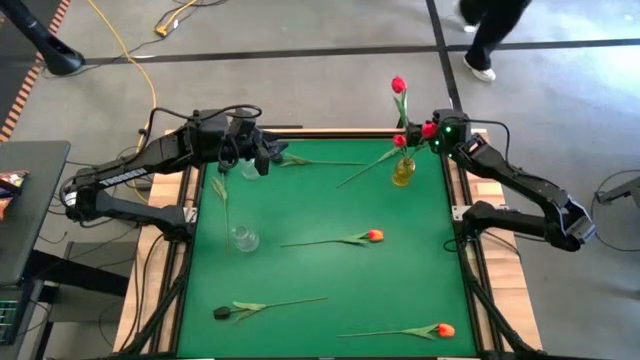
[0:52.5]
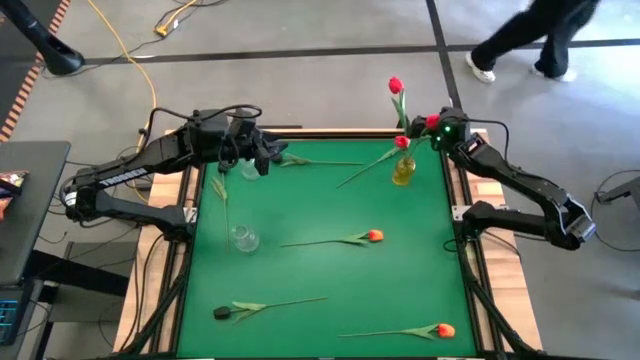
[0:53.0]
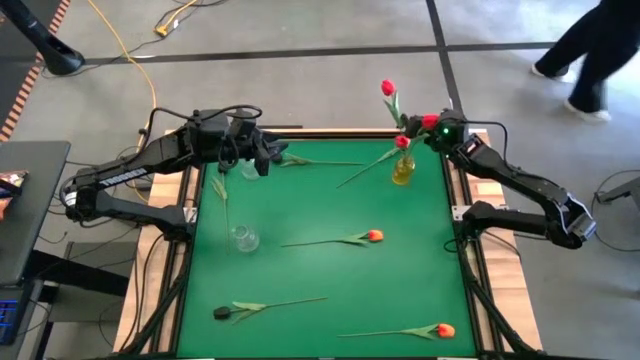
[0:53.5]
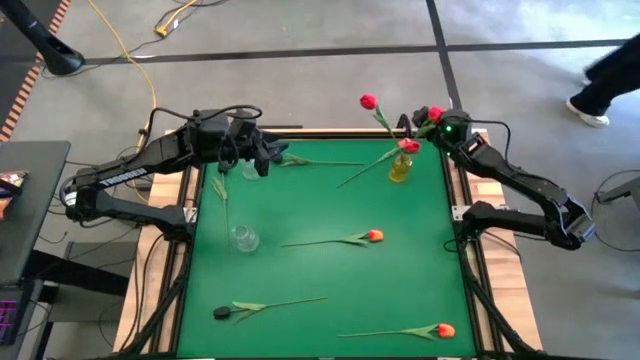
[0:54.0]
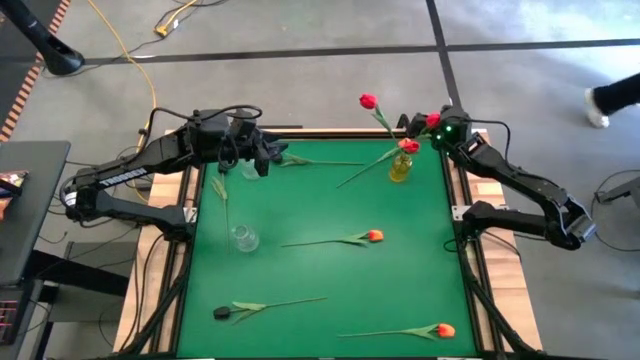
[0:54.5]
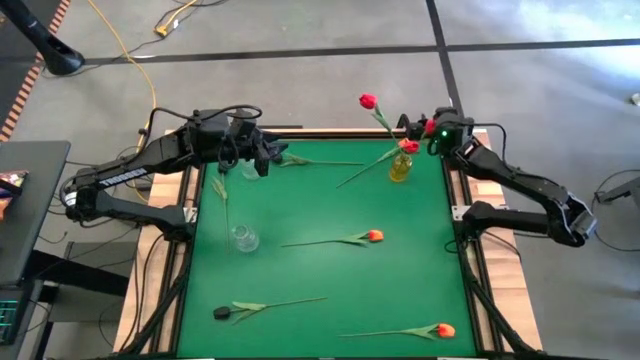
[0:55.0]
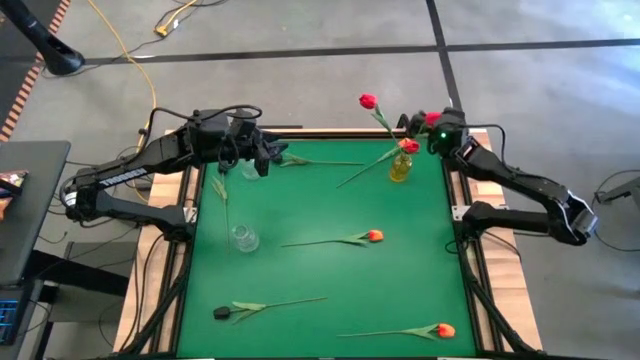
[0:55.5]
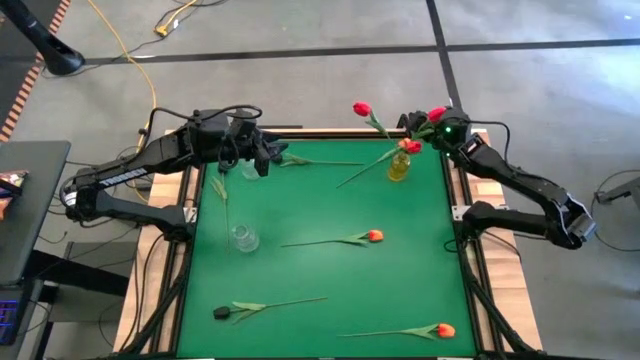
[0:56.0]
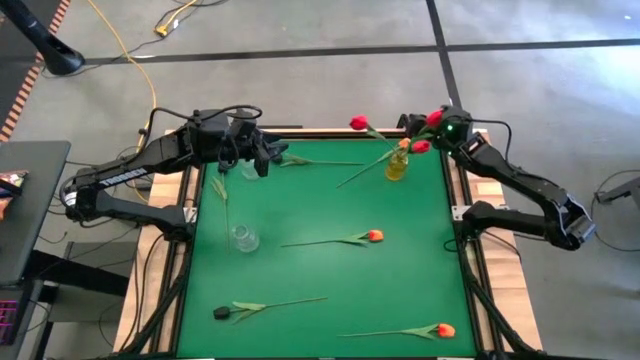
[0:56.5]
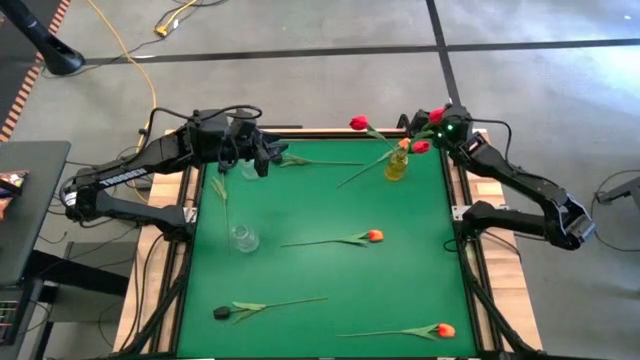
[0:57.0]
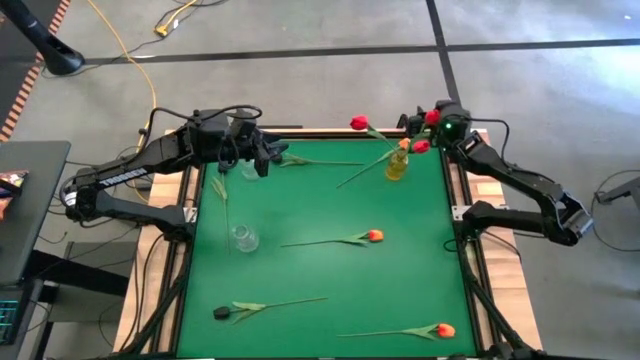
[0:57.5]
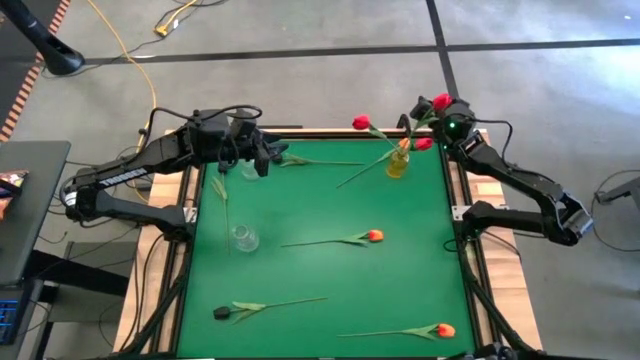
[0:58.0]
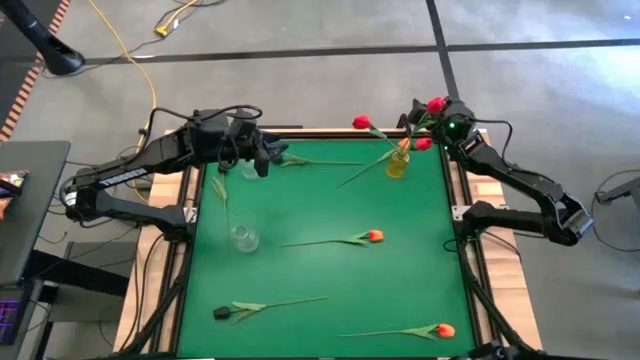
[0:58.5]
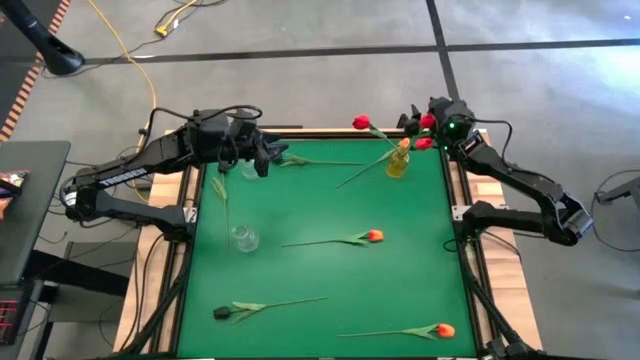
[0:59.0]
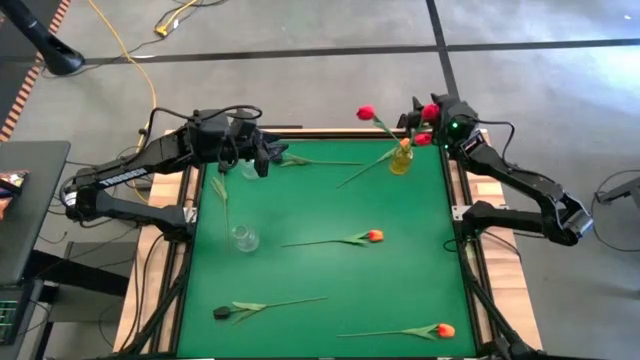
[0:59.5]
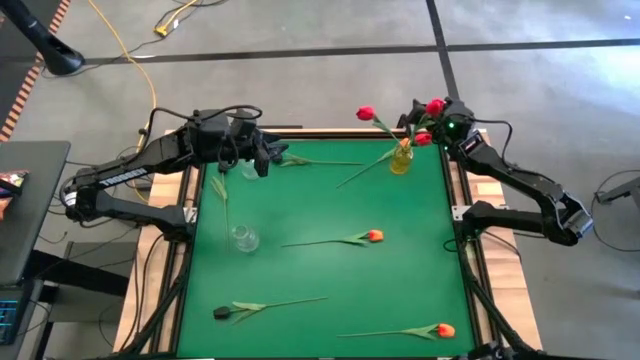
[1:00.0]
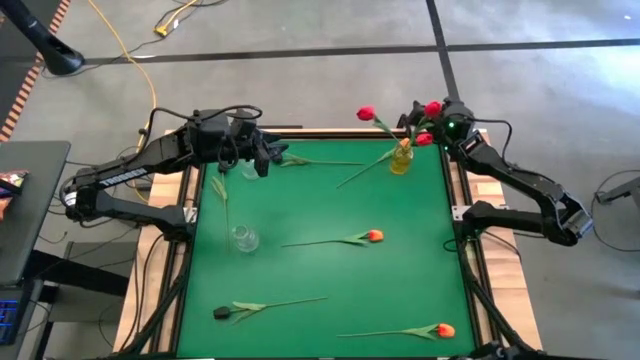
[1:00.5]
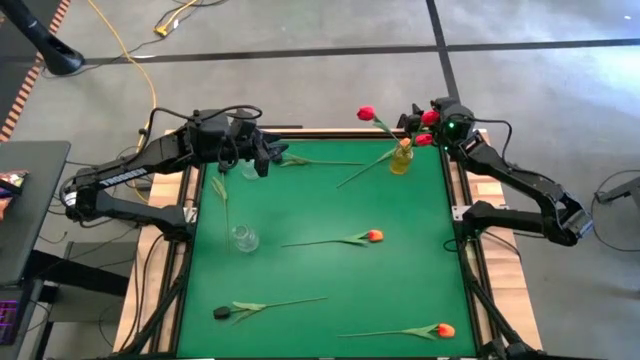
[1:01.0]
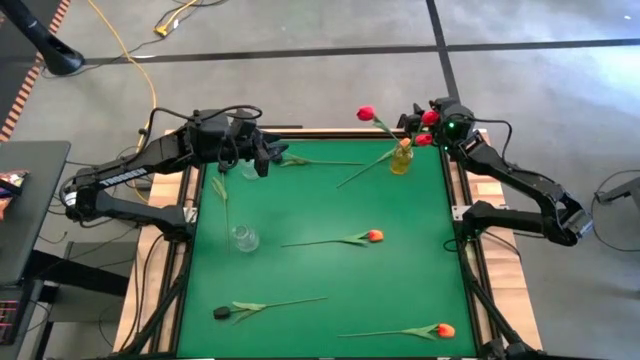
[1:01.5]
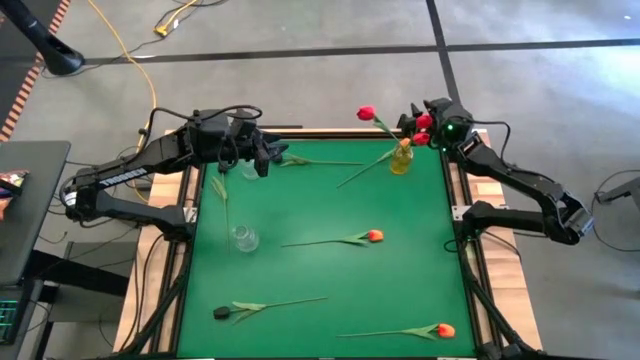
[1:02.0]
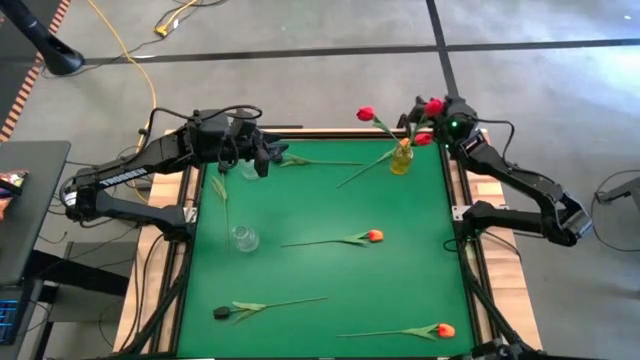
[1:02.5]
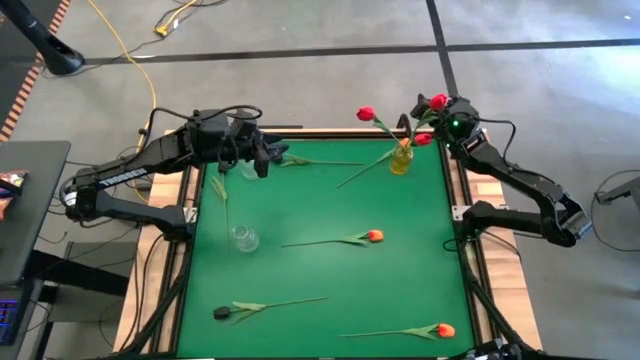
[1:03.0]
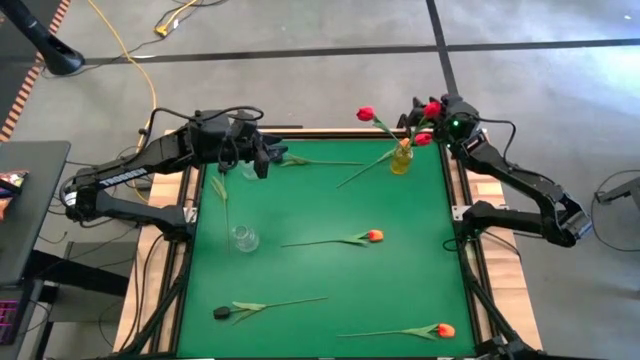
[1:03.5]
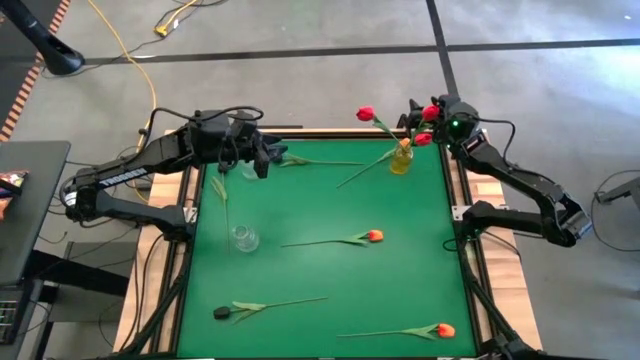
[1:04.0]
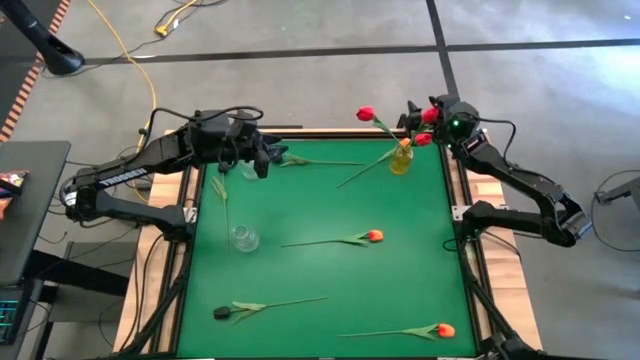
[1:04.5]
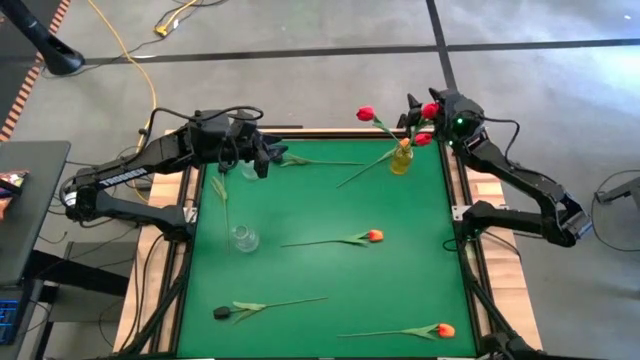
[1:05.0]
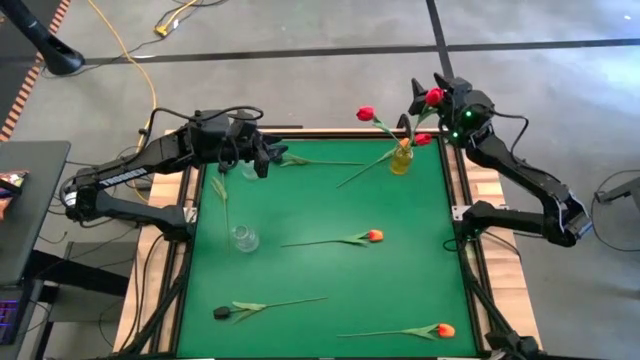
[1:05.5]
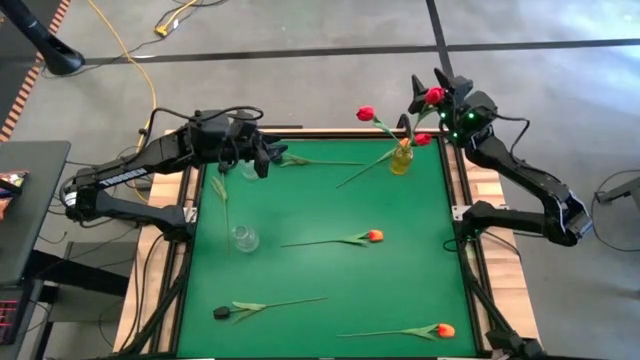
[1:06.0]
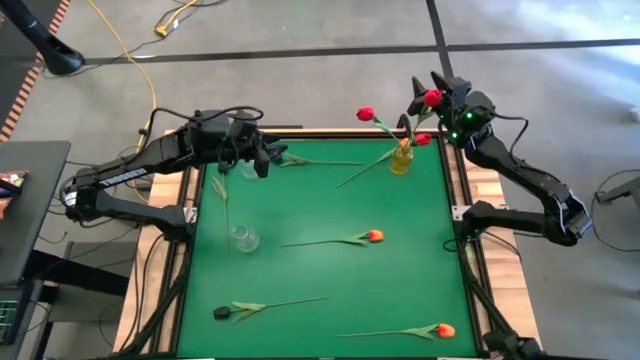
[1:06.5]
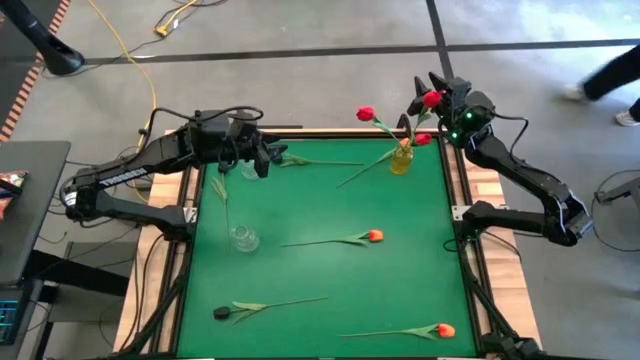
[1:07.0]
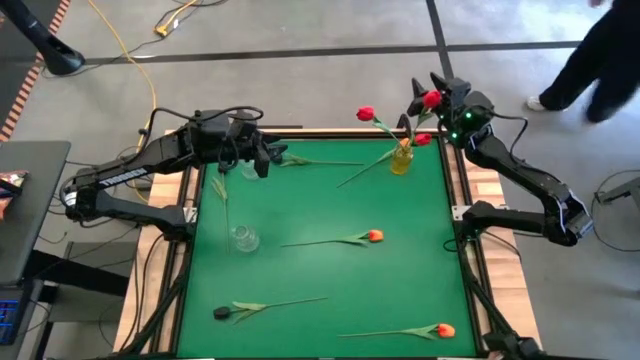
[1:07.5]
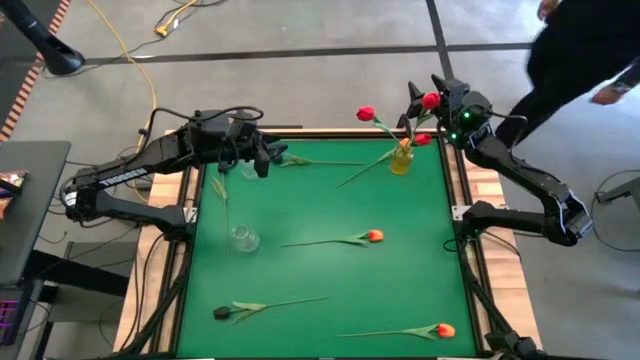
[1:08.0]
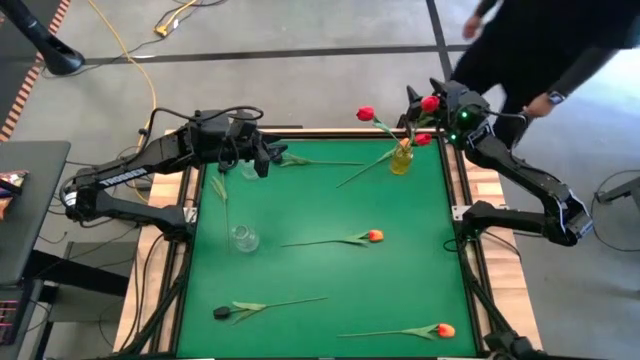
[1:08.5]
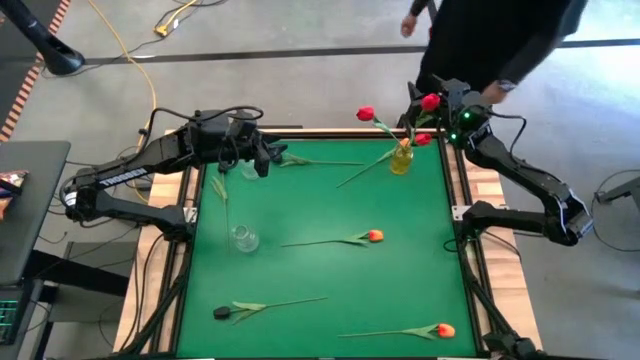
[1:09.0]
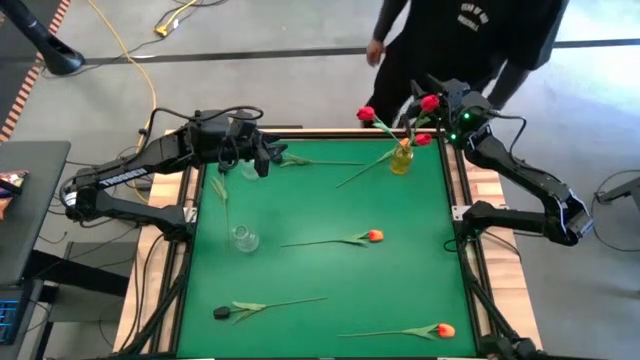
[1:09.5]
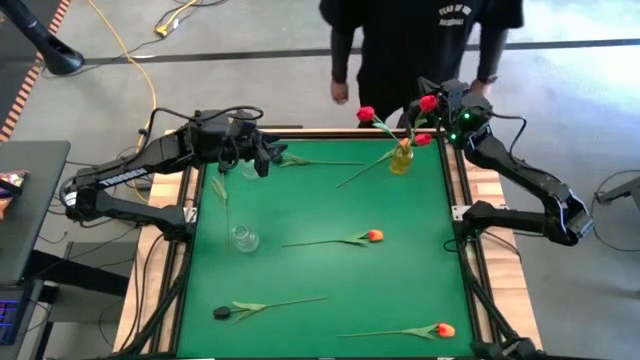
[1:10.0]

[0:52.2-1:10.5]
Task: Sort flowers into vase by color
Put the red flower into the yellow vase

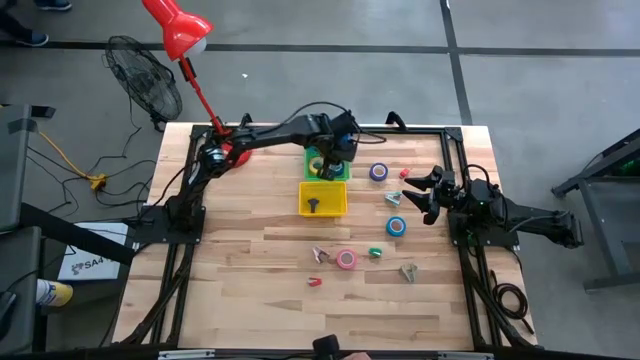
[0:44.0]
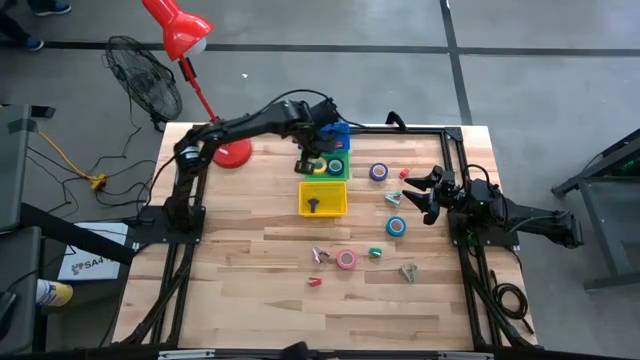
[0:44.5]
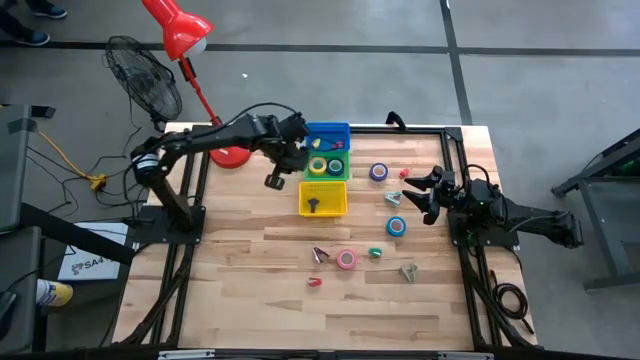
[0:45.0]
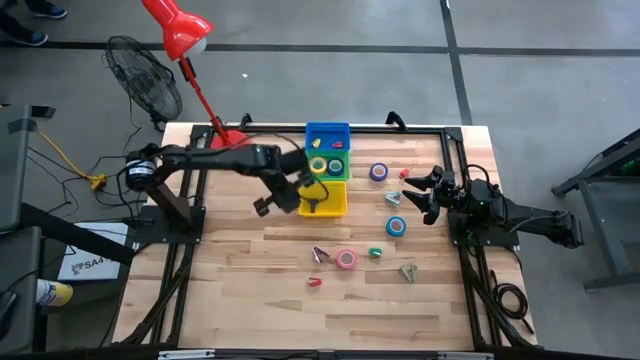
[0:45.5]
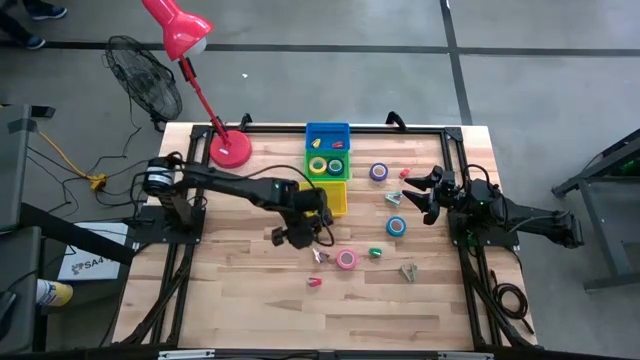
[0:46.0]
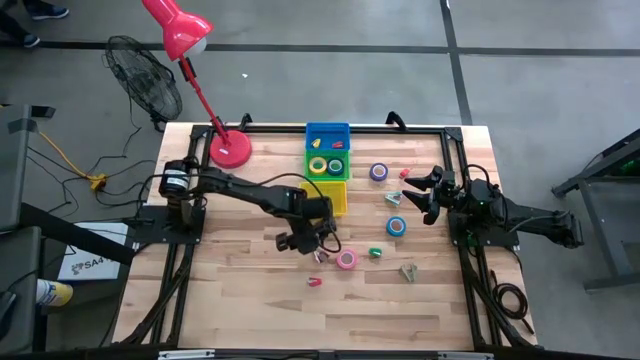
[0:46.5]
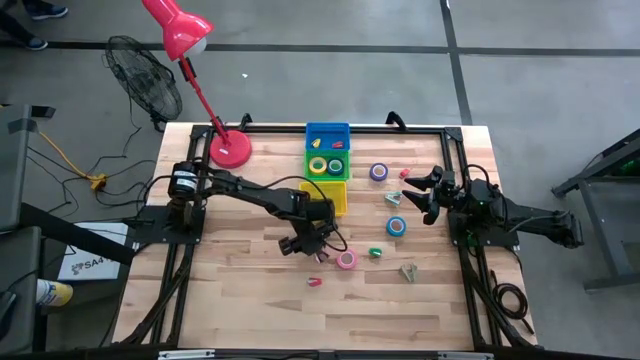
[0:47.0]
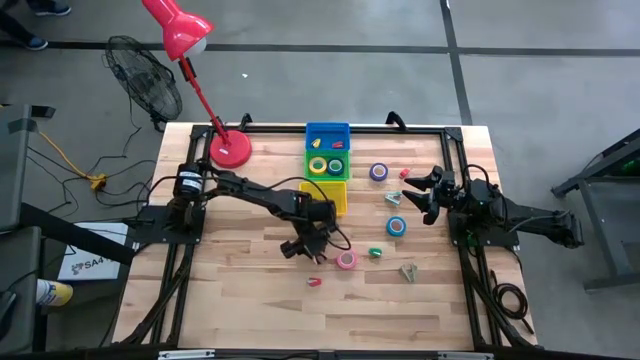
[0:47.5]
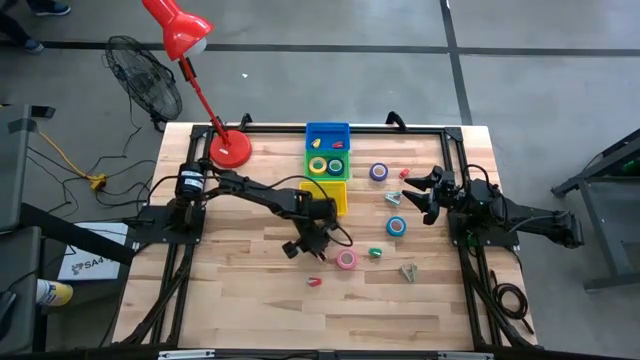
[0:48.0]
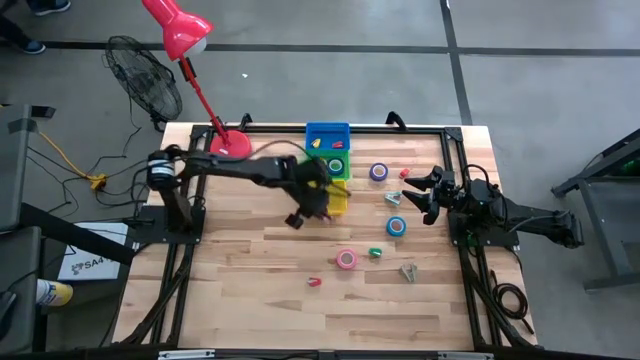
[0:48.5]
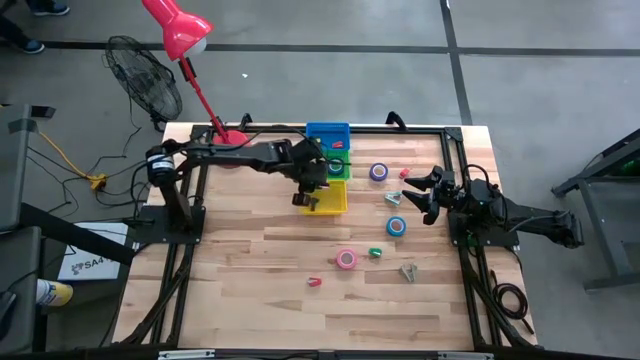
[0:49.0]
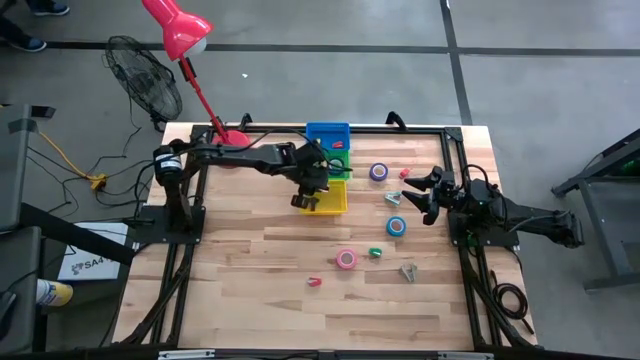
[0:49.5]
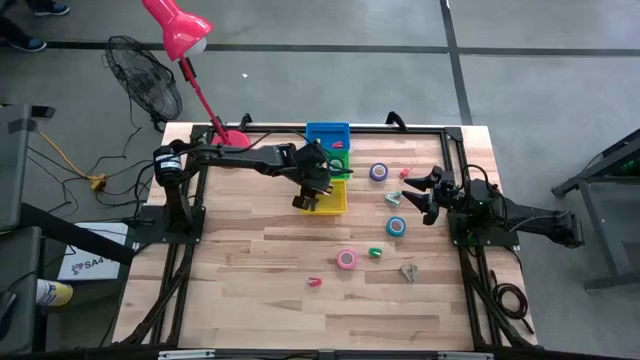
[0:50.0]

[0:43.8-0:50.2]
Task: Pick and place Stapler, Stapler remover, tape
Put the pink staple remover into the yellow bin
